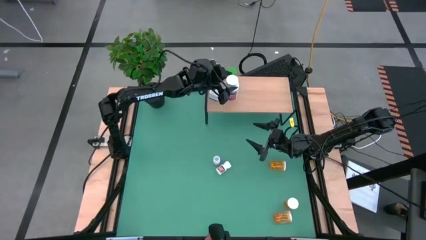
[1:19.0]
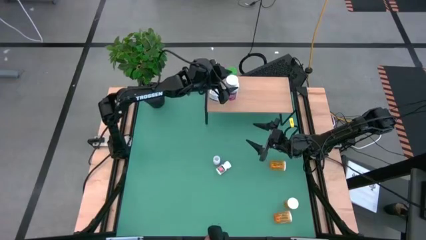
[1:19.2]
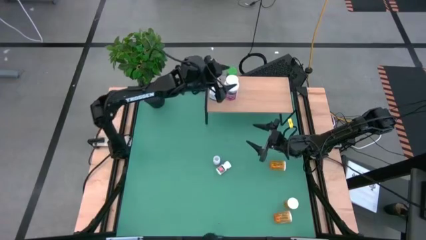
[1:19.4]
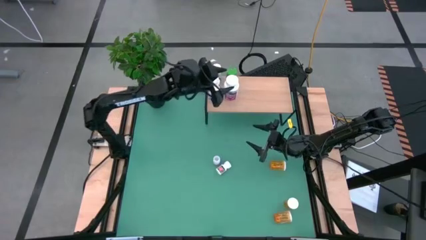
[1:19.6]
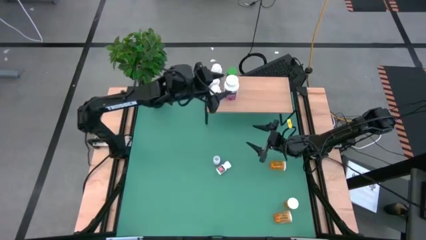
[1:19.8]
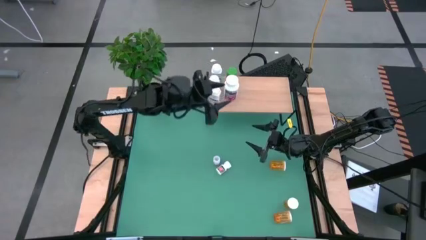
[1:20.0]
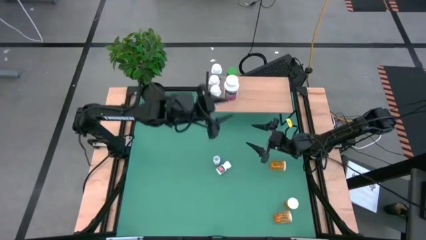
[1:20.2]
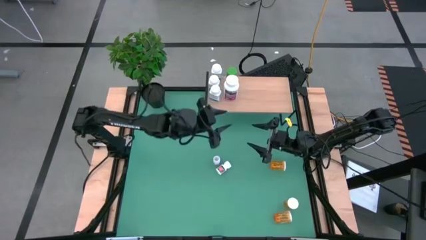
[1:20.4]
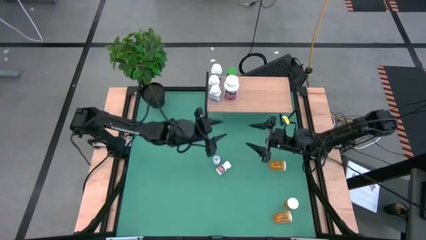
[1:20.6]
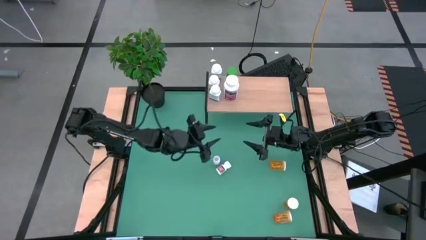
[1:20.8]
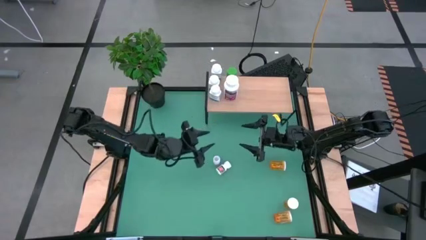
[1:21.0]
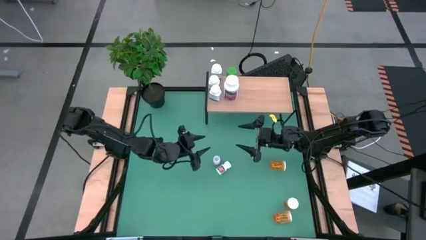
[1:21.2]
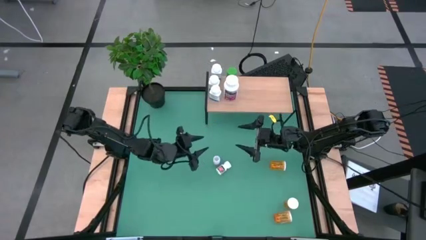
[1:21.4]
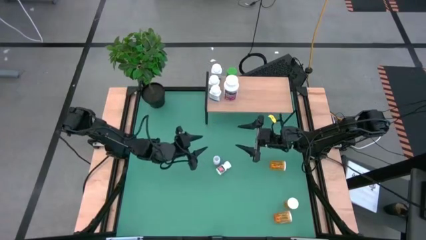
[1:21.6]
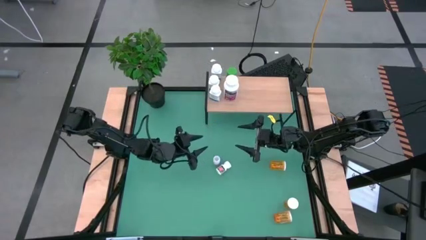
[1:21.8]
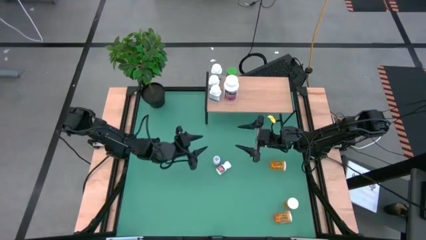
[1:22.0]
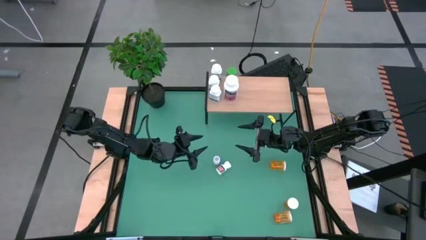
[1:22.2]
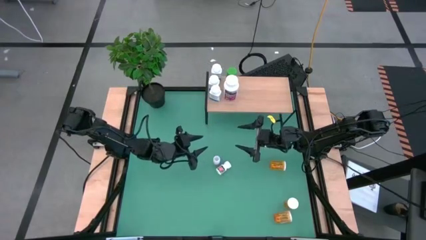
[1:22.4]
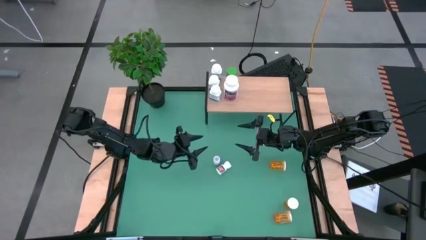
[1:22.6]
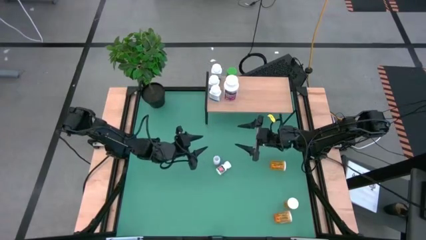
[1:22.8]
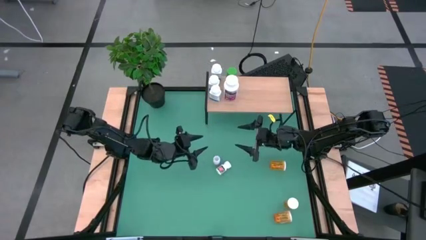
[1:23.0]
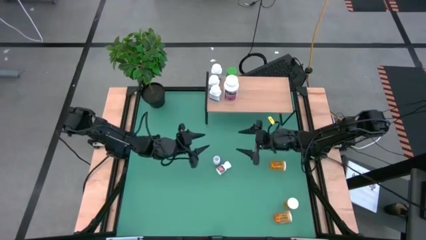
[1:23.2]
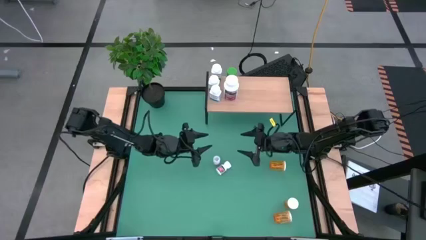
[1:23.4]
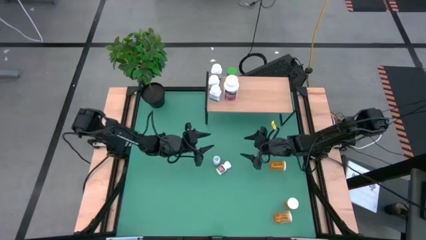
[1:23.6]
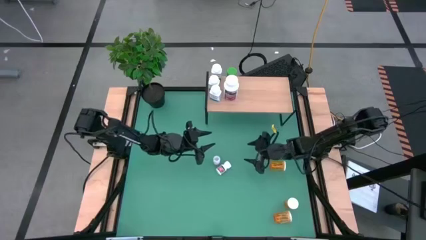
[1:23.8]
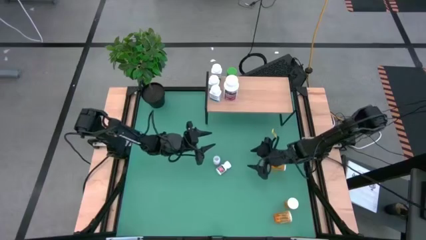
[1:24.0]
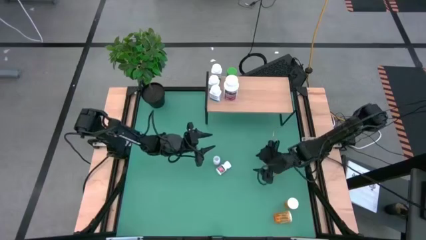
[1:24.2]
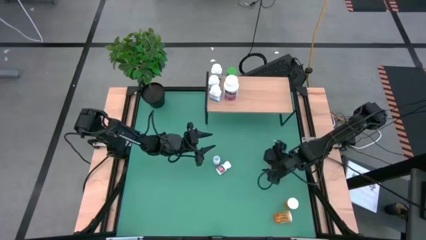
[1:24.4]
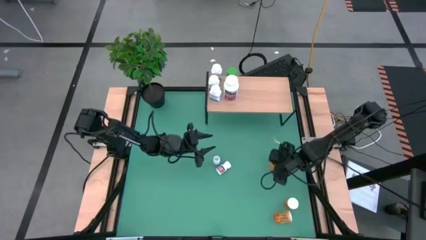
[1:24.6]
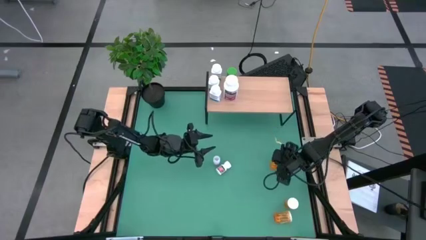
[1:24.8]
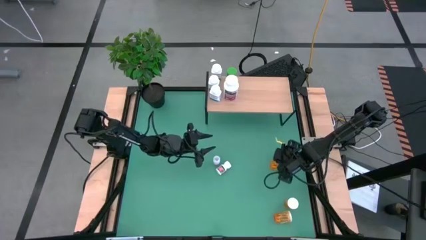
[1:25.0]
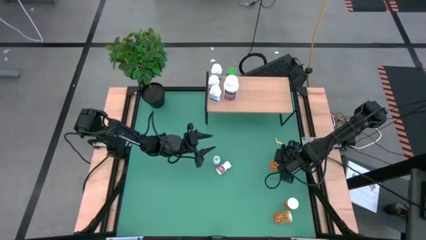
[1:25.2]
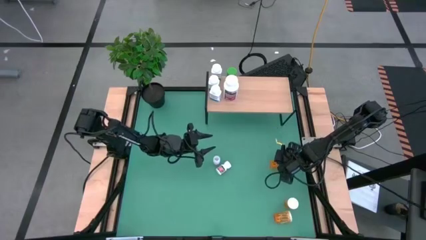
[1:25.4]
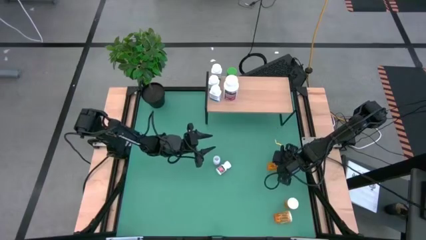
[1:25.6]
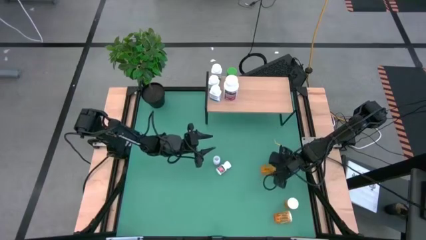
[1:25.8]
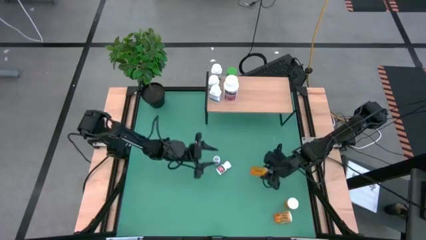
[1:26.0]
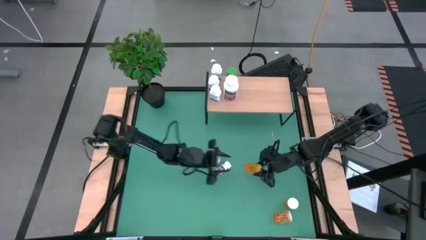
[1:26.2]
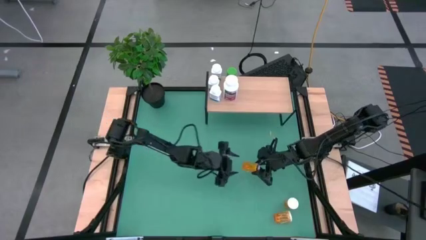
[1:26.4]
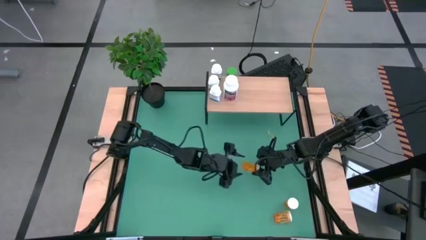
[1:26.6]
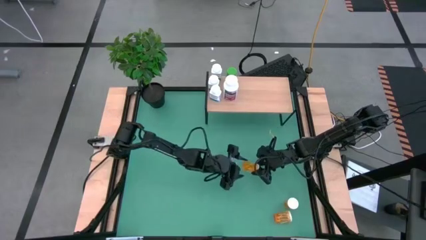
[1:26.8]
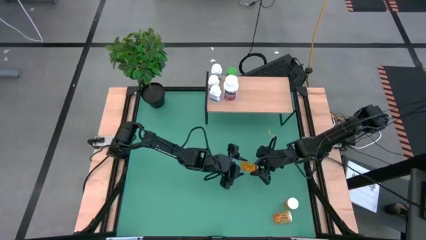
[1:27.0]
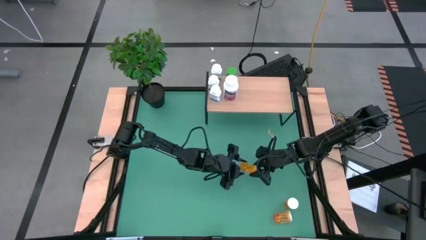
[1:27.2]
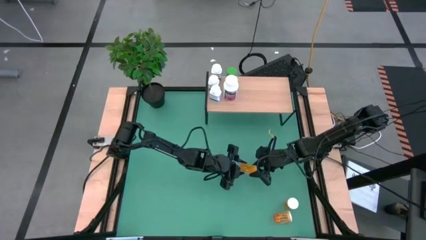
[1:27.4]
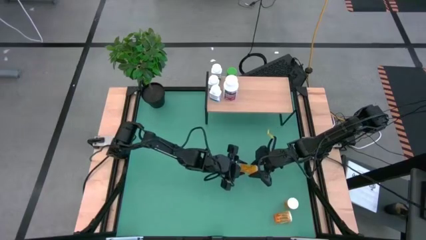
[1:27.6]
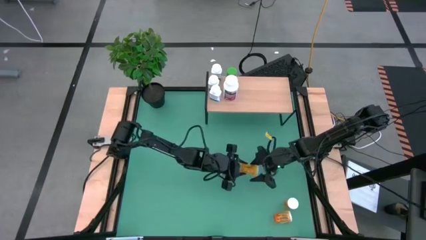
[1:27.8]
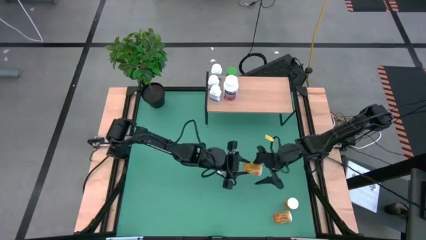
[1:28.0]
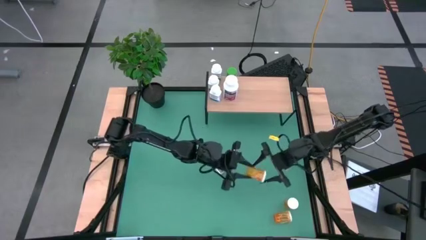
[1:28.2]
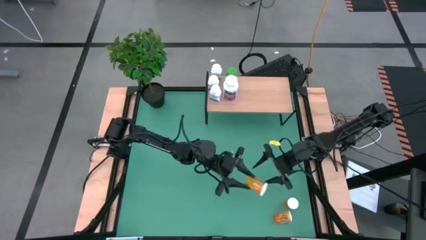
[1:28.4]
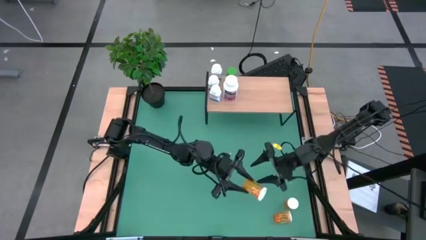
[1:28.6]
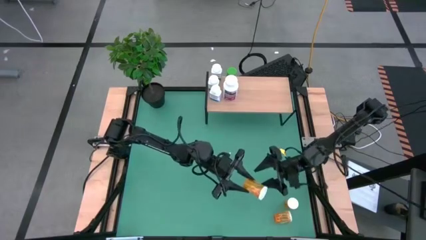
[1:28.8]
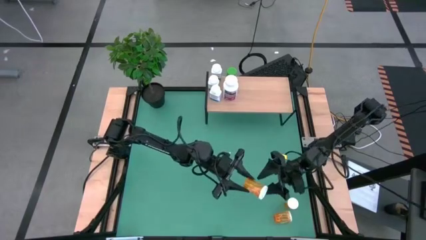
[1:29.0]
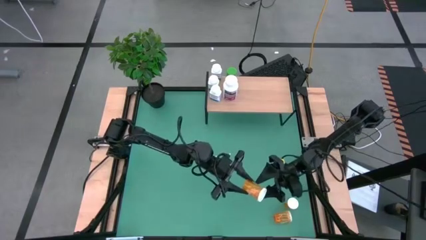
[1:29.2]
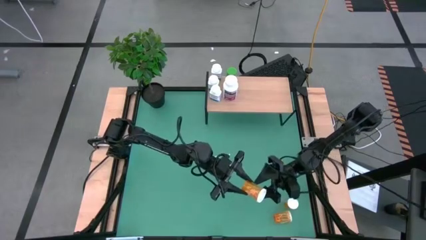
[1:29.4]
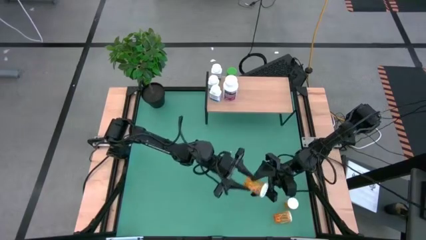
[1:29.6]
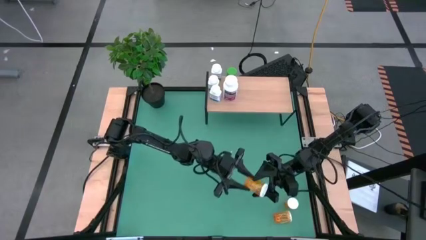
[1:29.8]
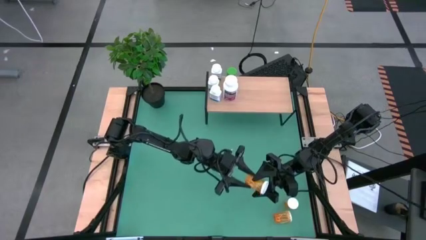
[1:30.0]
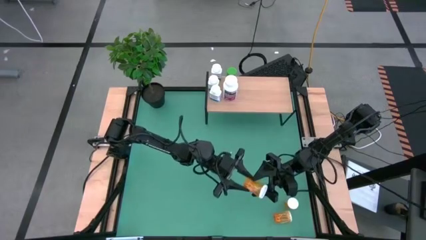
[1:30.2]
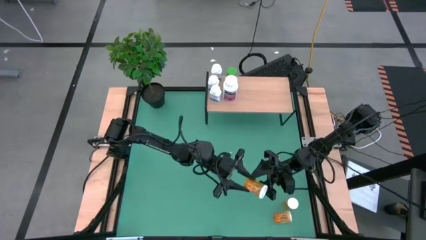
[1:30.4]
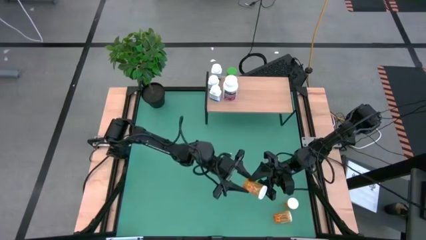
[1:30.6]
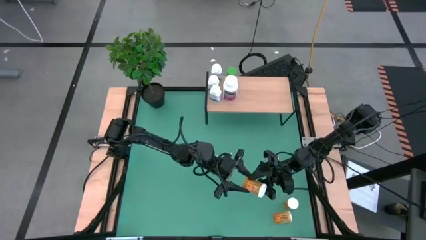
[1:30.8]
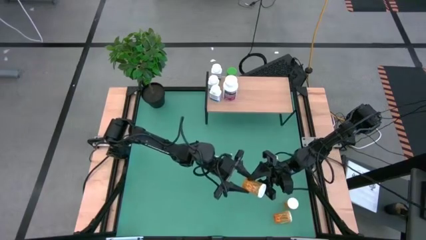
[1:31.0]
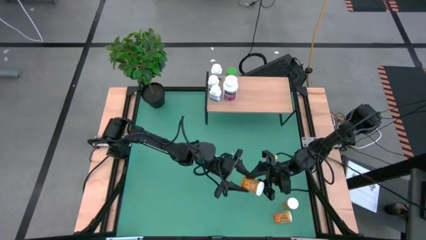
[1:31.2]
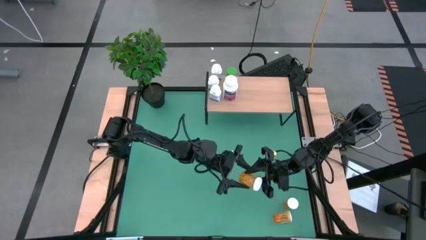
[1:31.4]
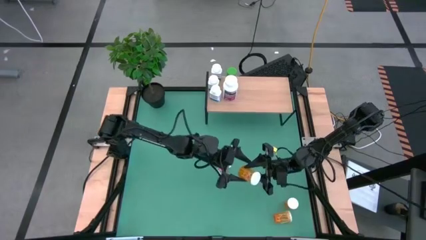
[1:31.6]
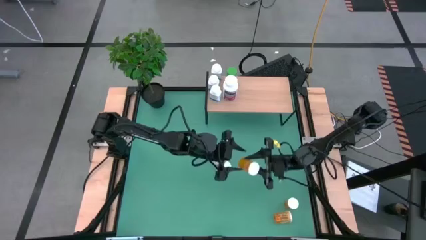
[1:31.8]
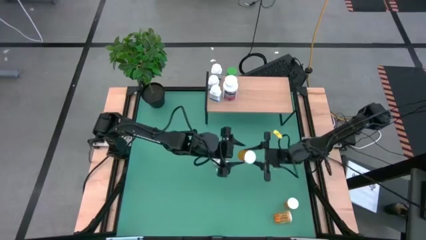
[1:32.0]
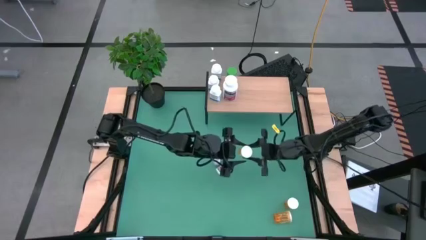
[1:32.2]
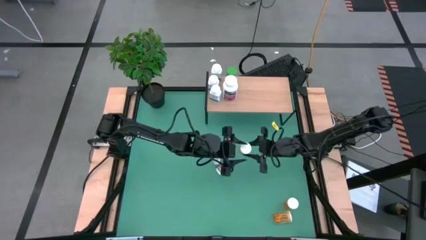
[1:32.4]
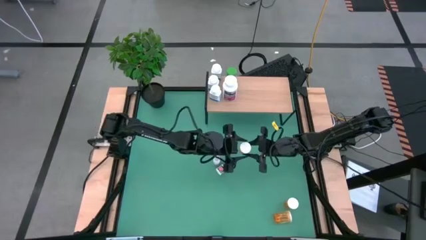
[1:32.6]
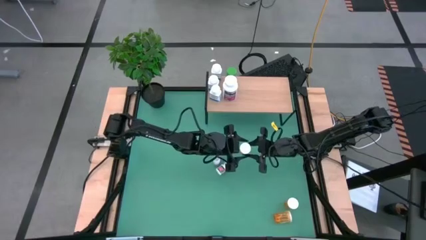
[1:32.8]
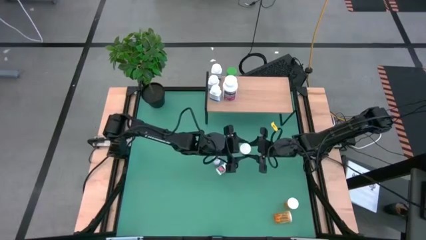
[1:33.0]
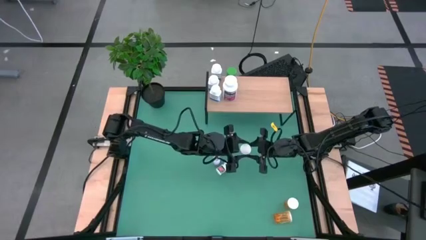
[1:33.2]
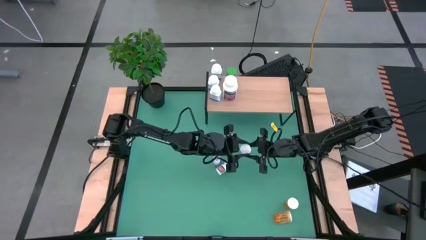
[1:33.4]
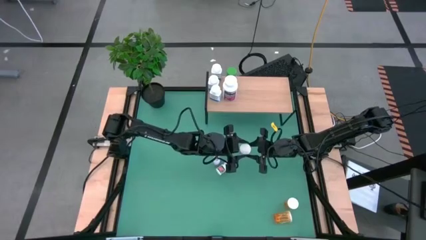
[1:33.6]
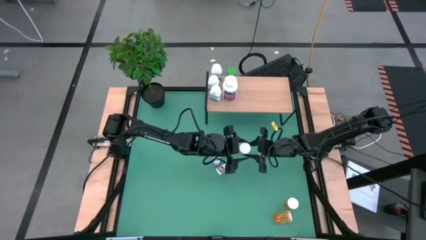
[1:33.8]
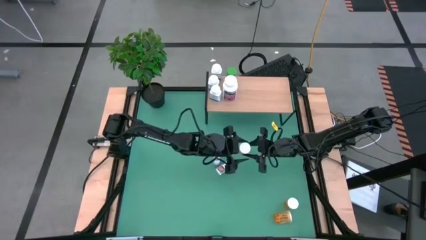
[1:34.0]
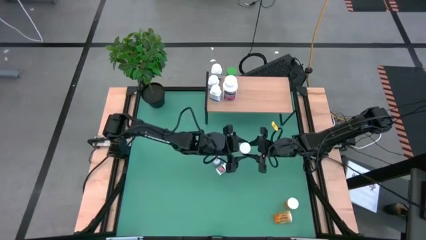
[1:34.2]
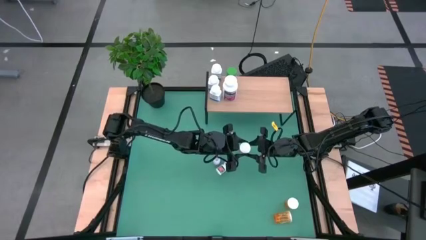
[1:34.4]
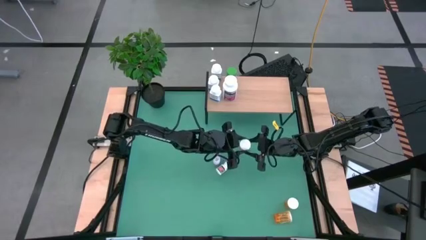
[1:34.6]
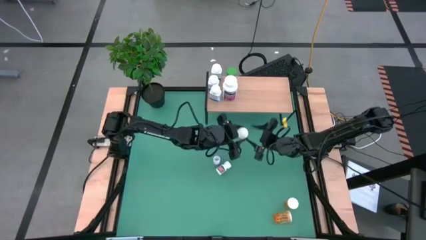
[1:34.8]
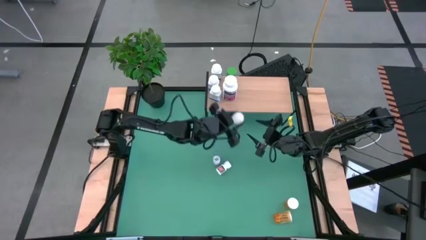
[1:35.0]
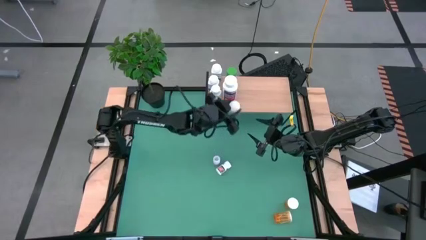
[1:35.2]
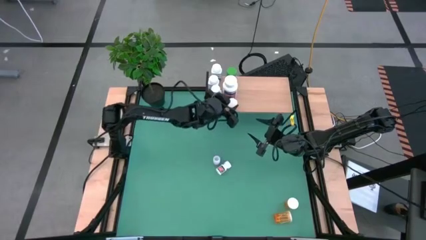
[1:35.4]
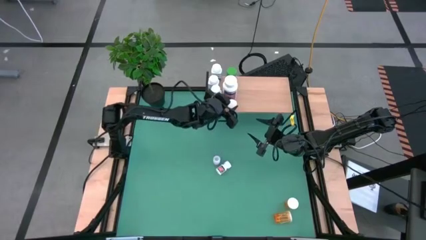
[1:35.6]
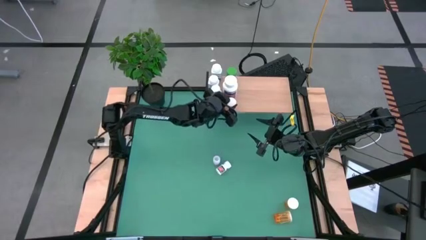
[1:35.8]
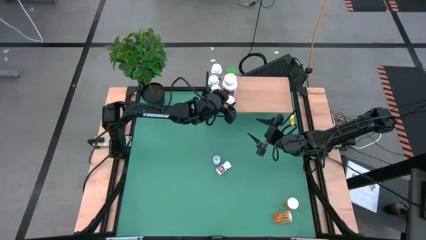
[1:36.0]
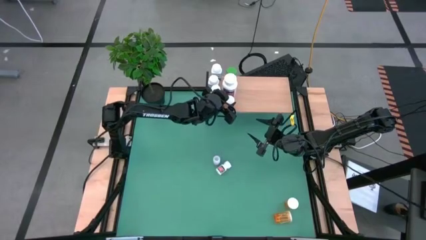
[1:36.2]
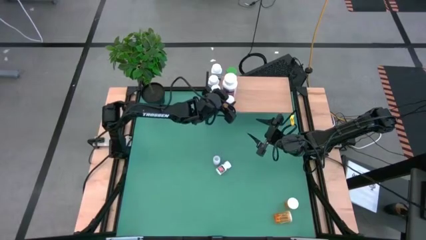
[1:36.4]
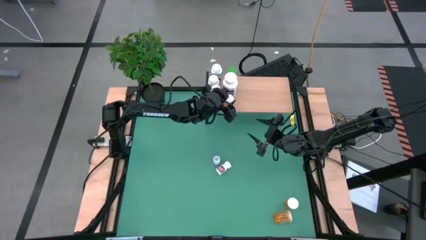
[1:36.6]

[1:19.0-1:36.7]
Task: Pick and place medicine bottles onto shelf by color
Put the top orange pill bottle on the shelf
